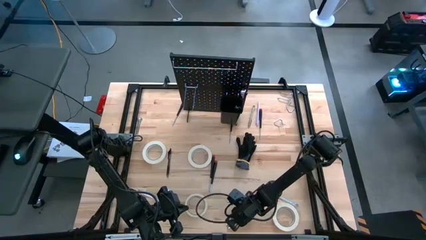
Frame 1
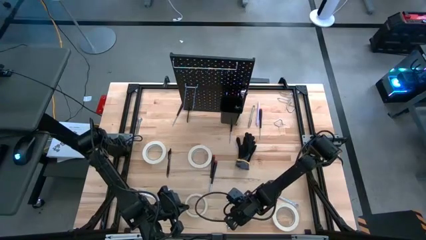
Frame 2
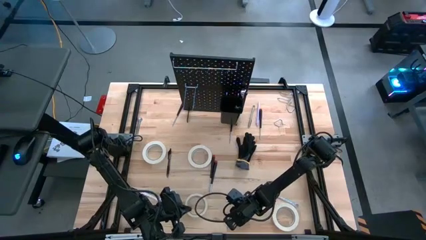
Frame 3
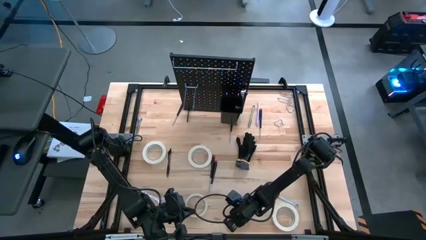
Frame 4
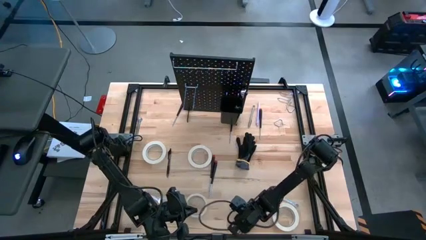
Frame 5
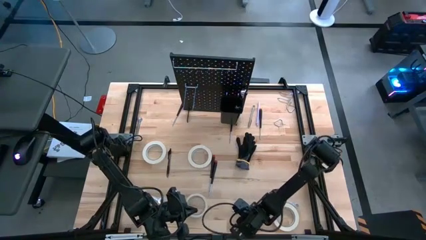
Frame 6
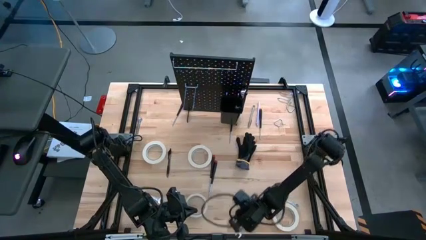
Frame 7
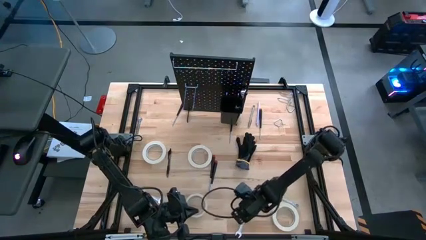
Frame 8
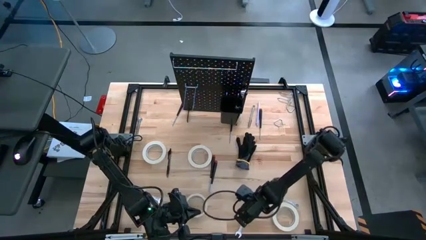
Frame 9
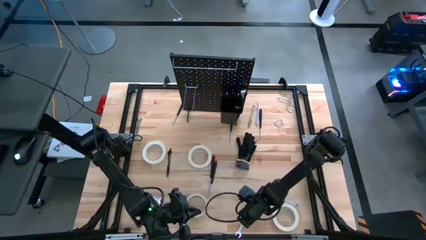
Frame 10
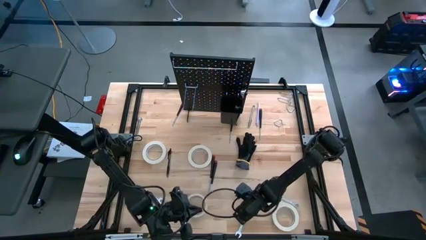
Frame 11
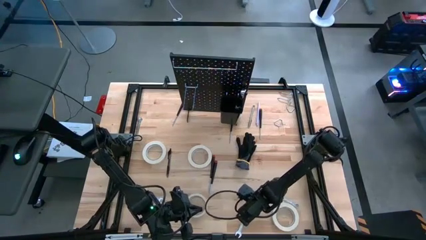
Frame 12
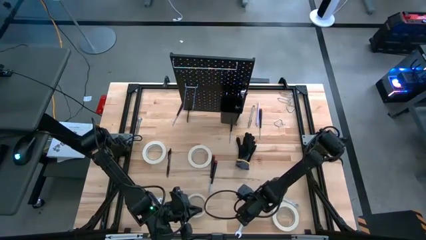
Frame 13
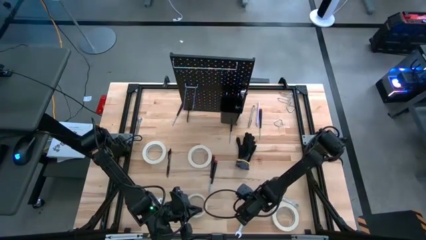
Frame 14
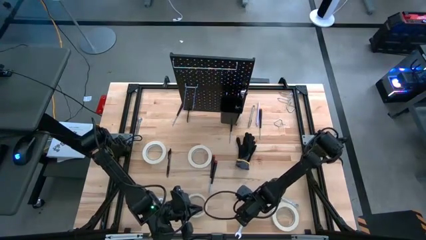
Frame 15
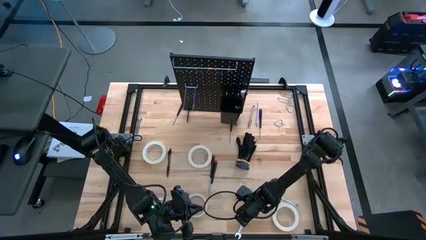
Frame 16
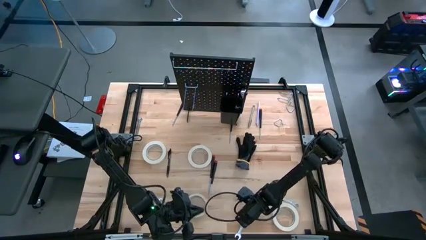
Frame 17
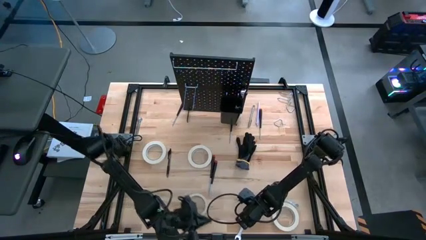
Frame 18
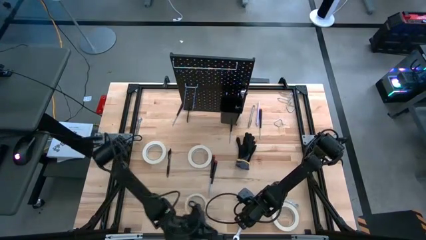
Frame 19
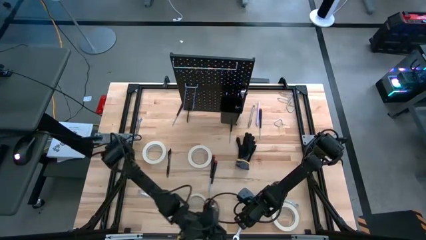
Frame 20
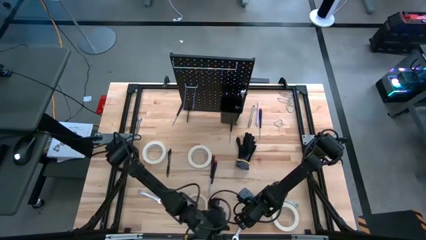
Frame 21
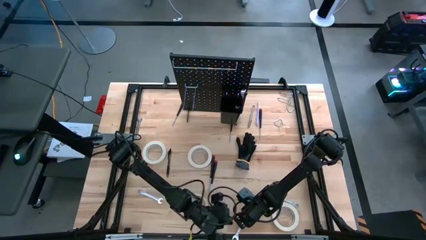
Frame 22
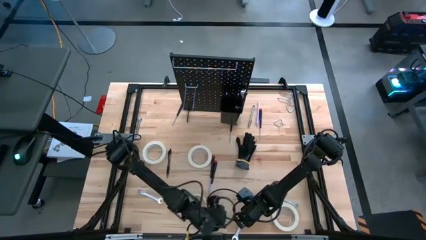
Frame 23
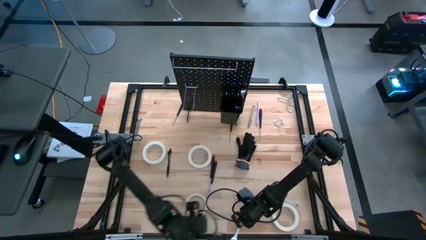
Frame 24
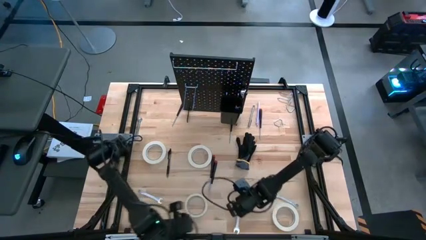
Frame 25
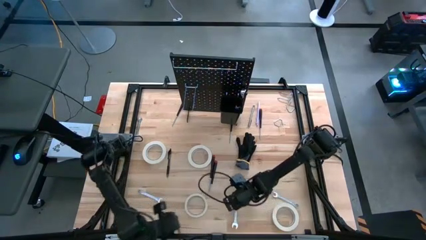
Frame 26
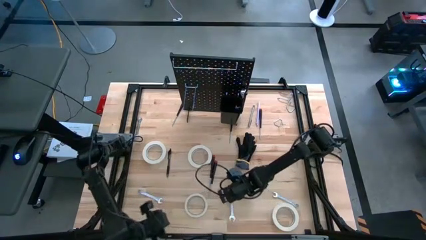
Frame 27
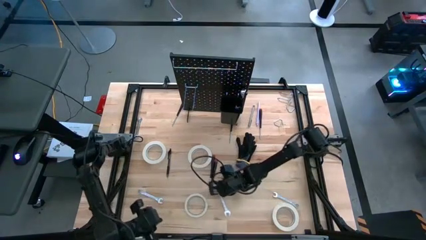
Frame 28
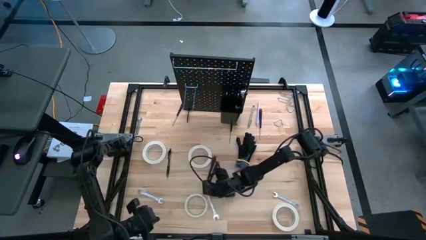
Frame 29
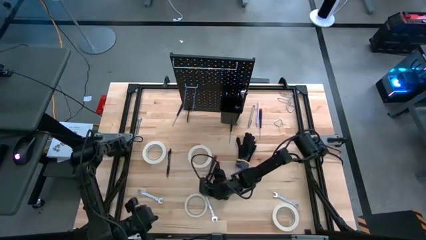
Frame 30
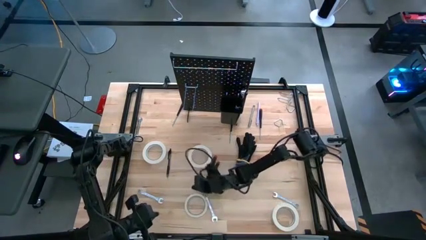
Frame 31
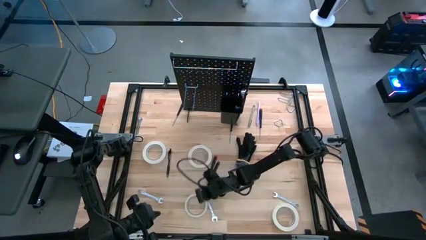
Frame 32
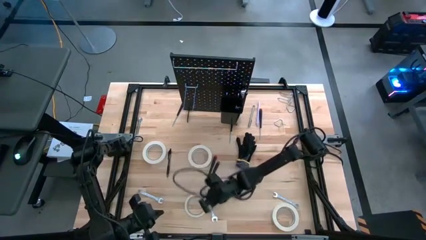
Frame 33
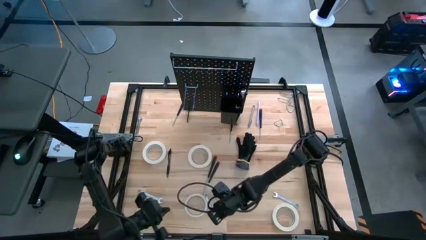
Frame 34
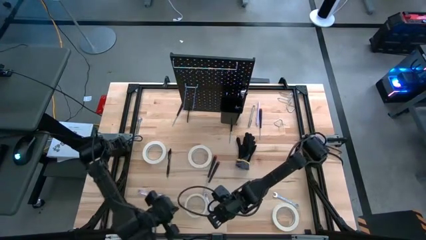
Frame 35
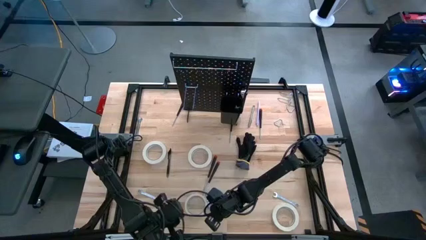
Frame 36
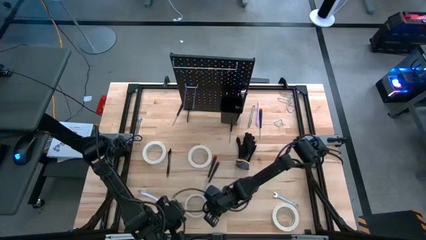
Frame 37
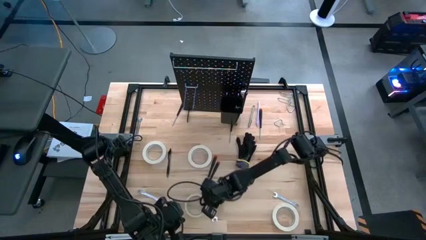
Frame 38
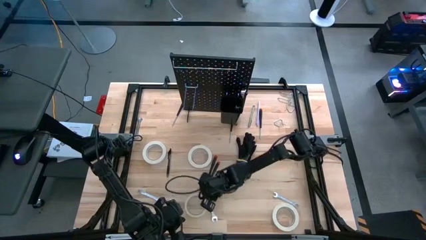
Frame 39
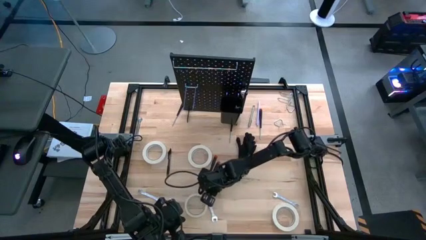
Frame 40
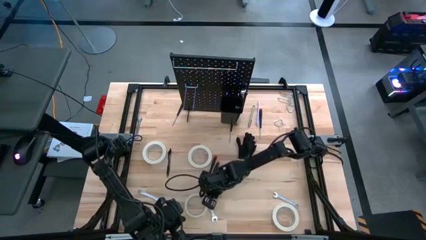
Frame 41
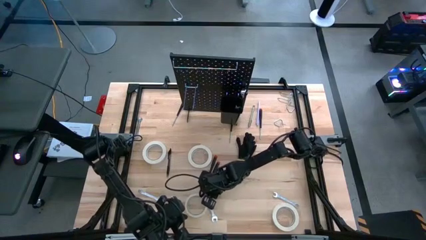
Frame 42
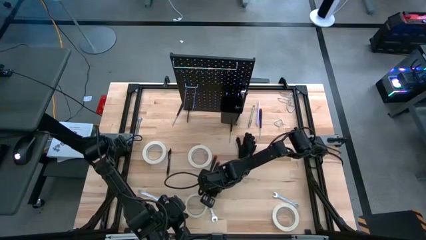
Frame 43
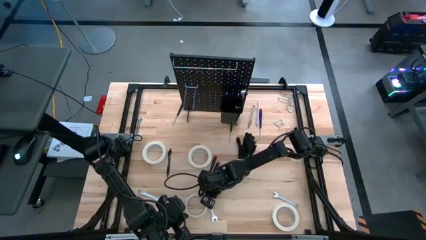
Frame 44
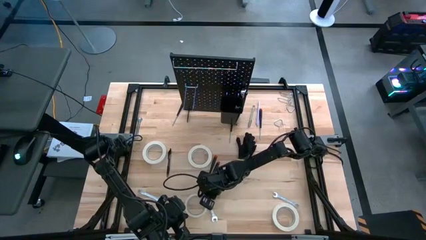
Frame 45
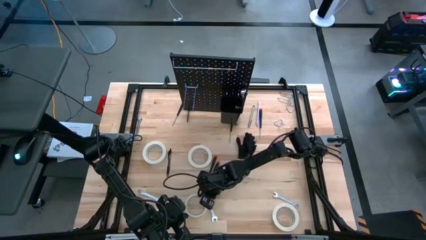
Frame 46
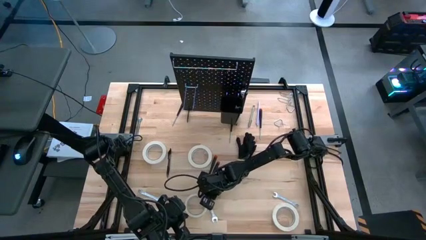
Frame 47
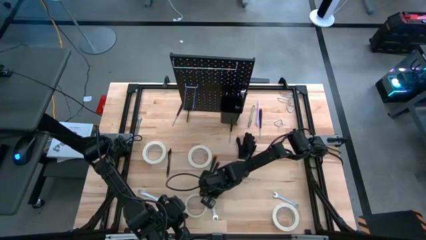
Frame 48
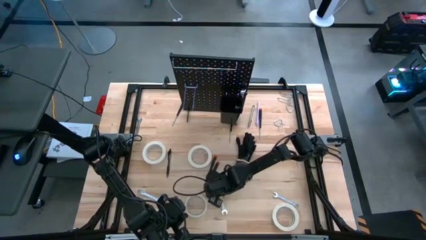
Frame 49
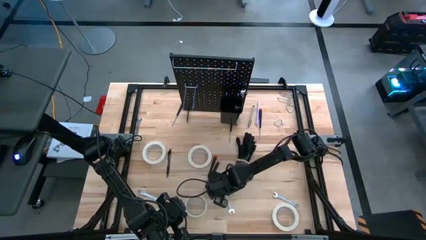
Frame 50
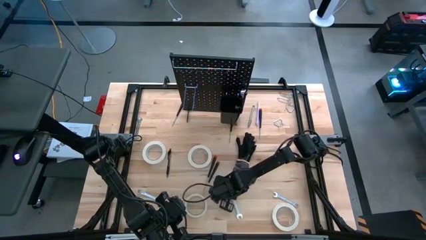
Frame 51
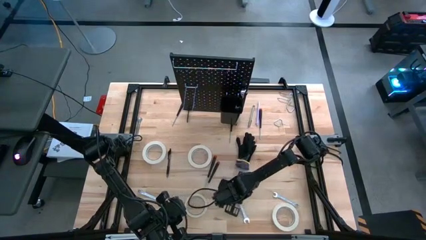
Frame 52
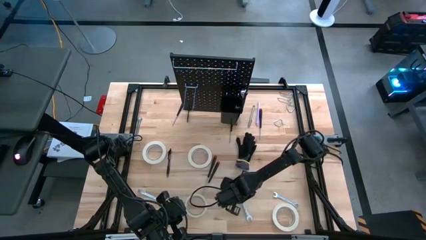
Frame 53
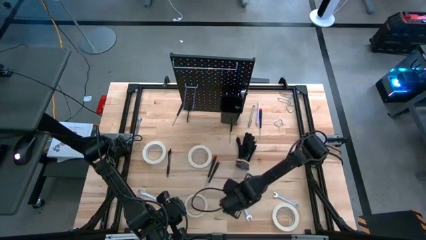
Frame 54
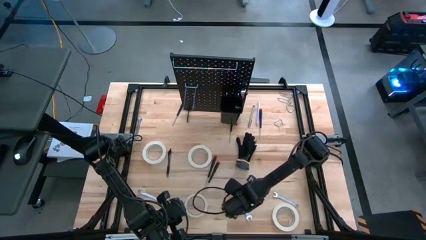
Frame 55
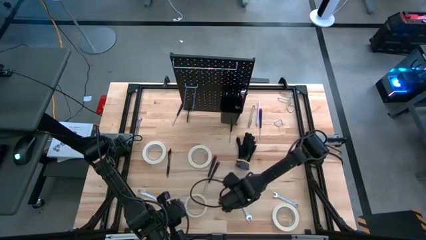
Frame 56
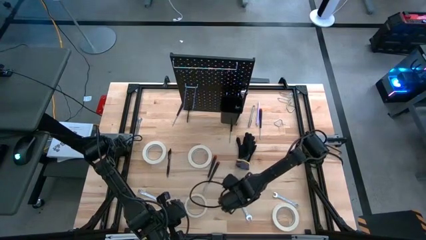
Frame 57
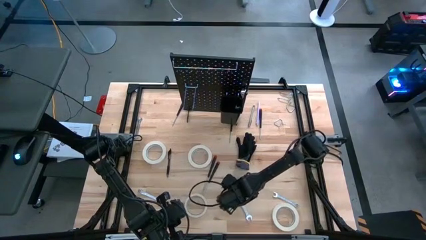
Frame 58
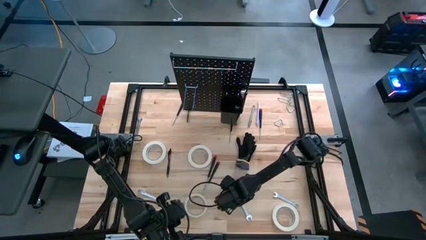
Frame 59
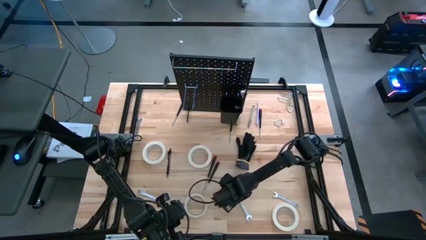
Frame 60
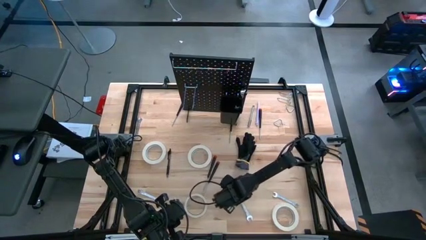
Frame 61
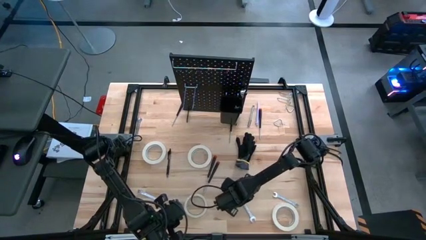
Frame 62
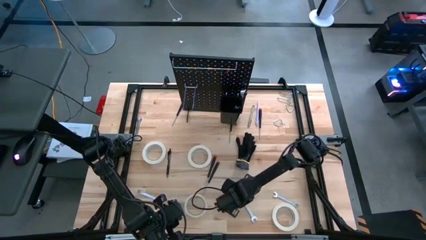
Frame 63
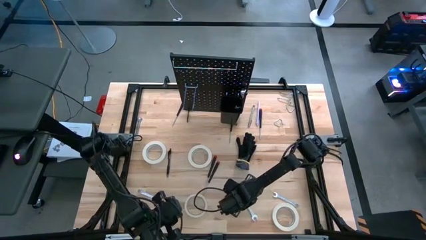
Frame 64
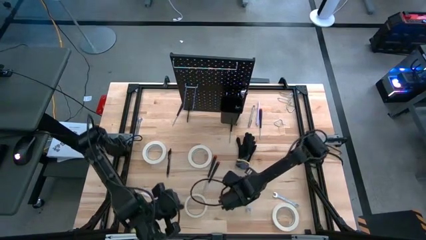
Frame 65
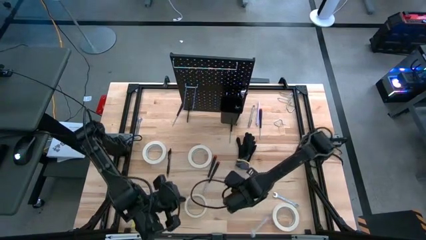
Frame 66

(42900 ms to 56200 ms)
Task: Hang tools onto peg board
Hang the 12 mm tool onto the pegboard on the top left
